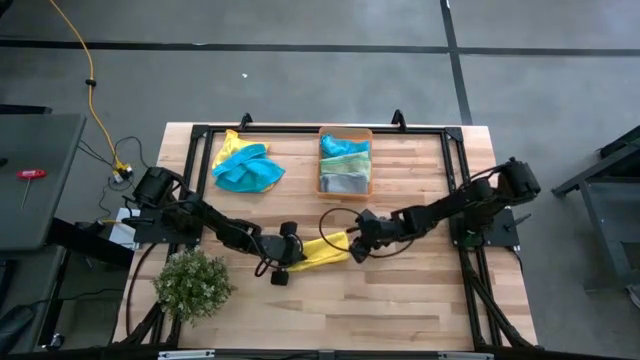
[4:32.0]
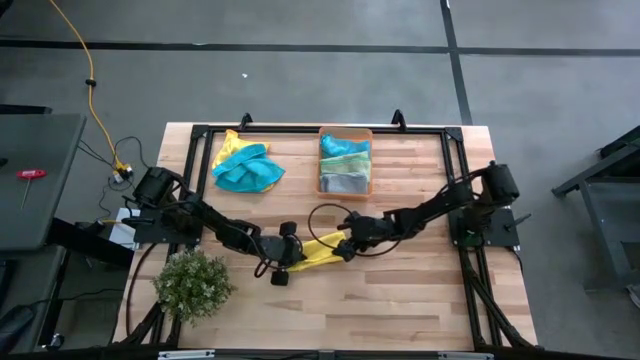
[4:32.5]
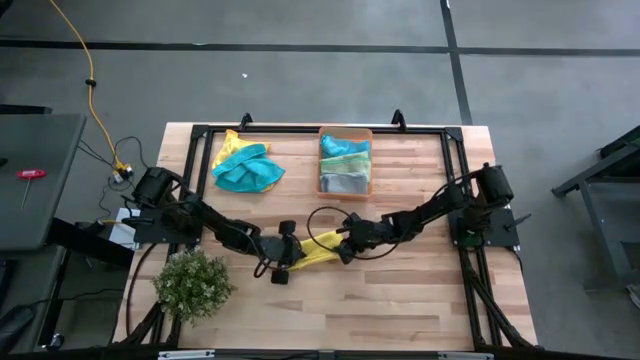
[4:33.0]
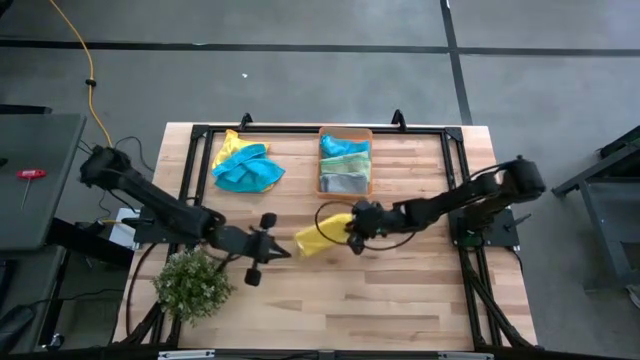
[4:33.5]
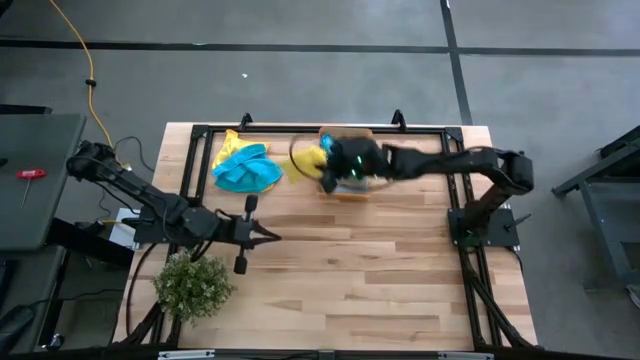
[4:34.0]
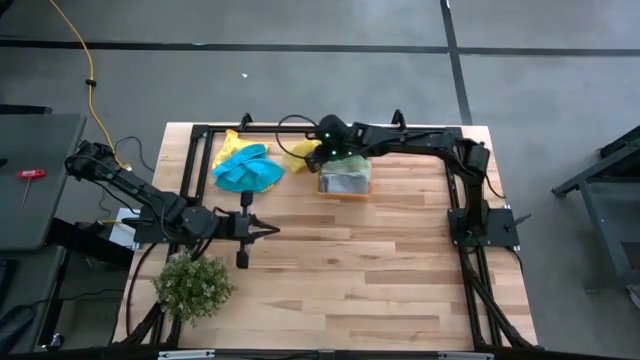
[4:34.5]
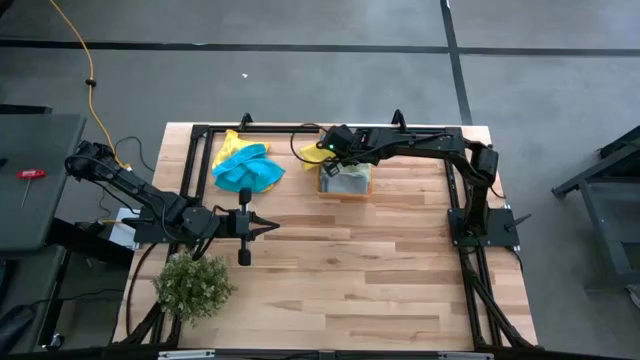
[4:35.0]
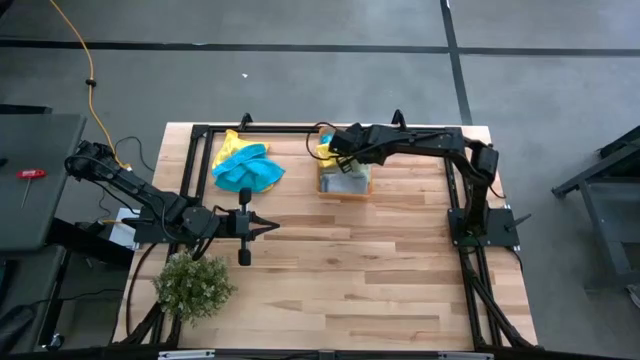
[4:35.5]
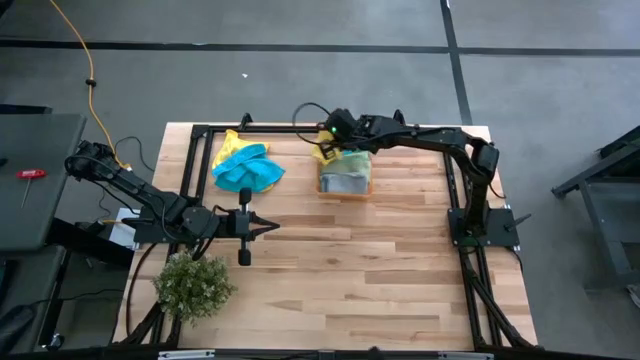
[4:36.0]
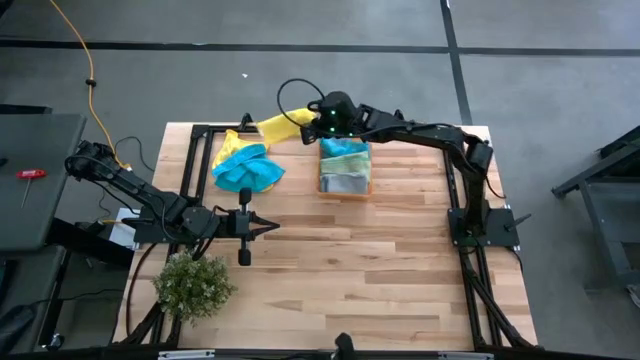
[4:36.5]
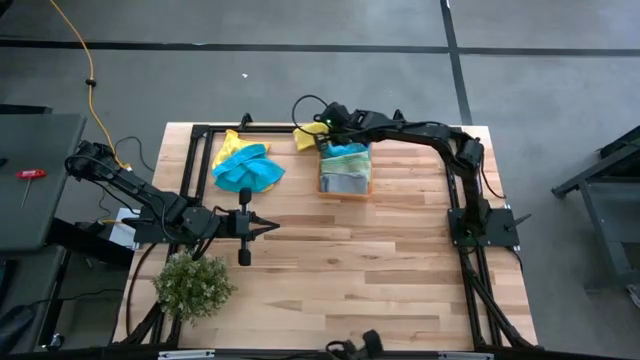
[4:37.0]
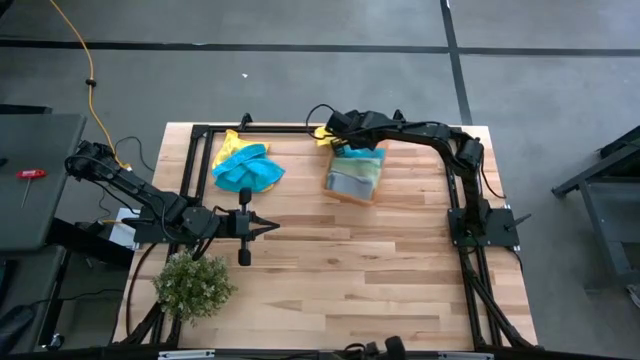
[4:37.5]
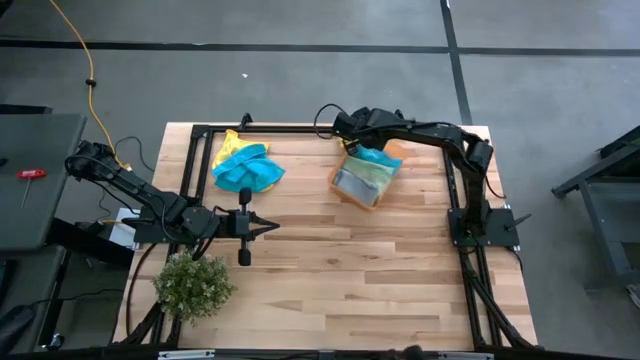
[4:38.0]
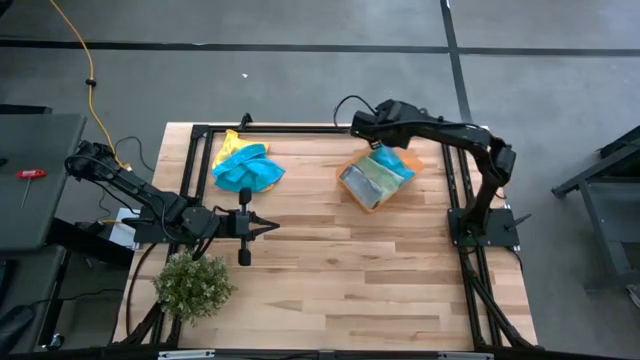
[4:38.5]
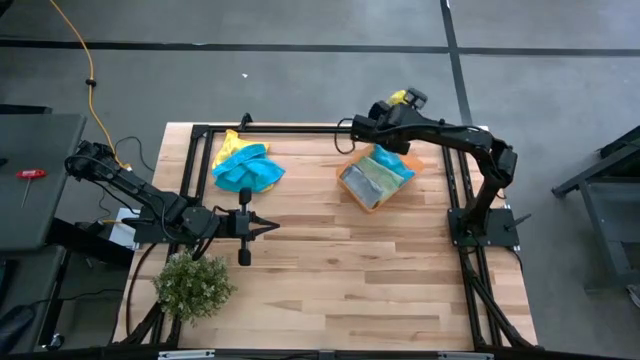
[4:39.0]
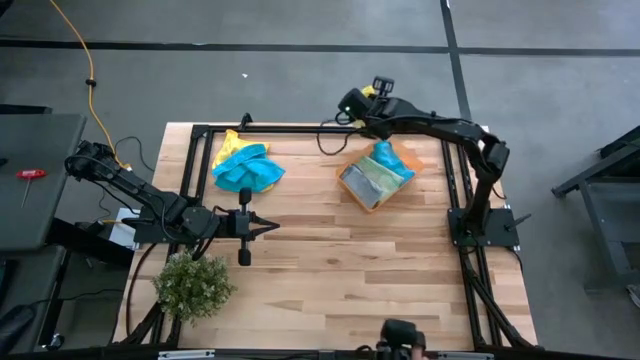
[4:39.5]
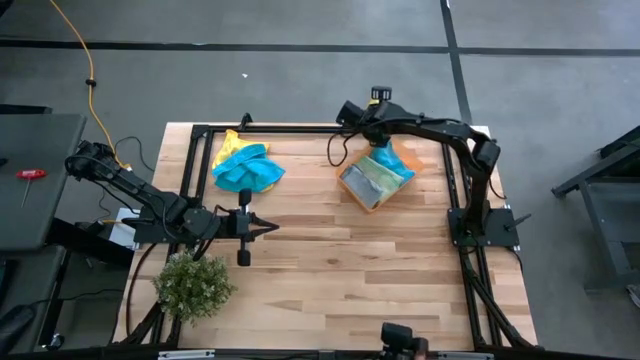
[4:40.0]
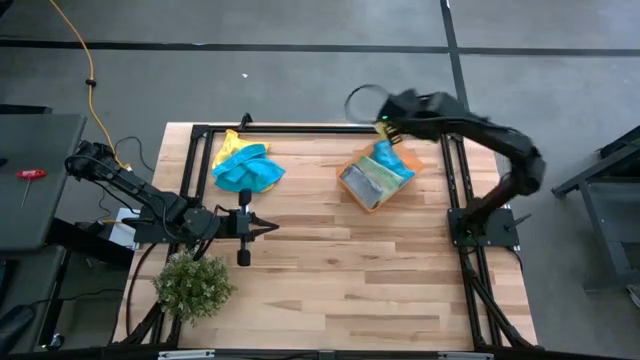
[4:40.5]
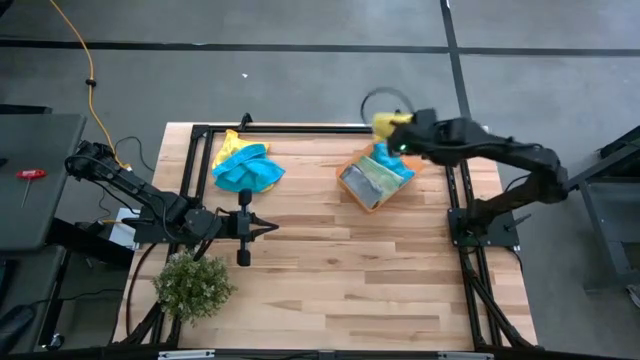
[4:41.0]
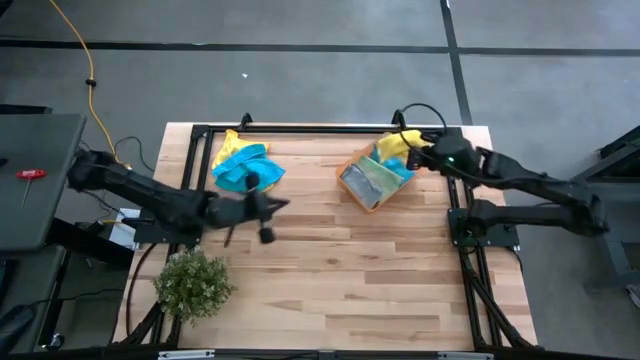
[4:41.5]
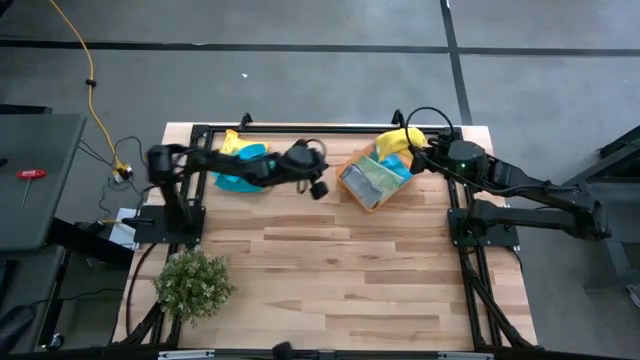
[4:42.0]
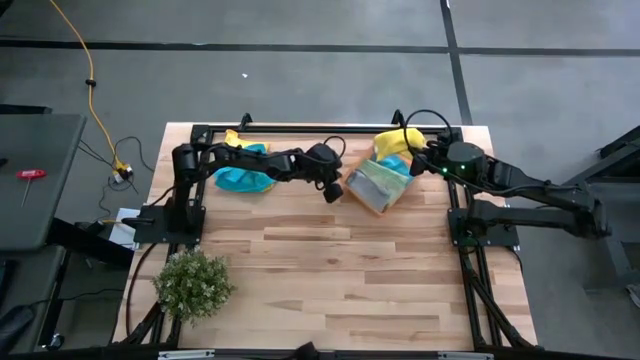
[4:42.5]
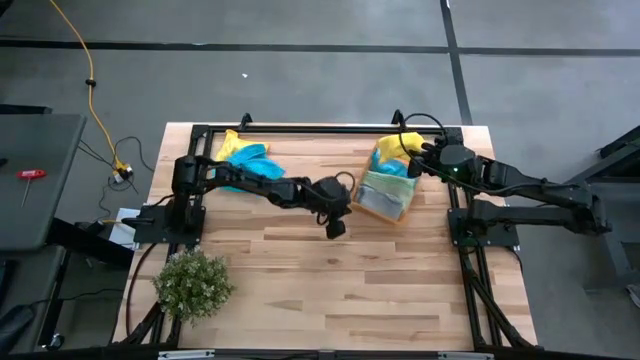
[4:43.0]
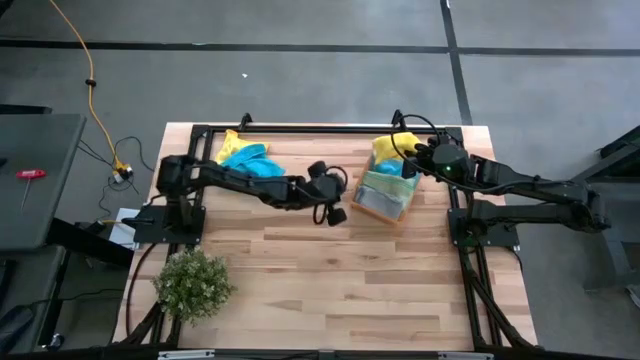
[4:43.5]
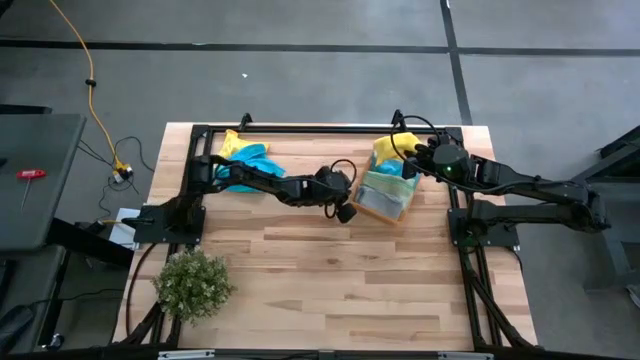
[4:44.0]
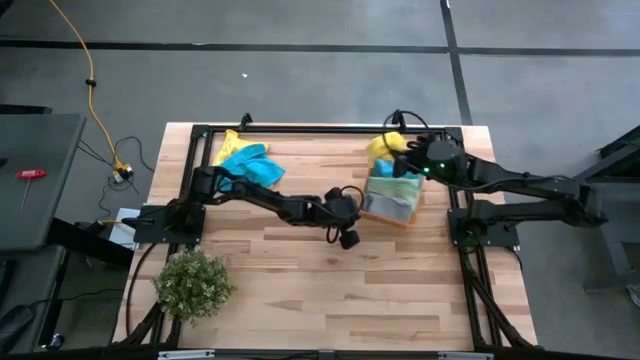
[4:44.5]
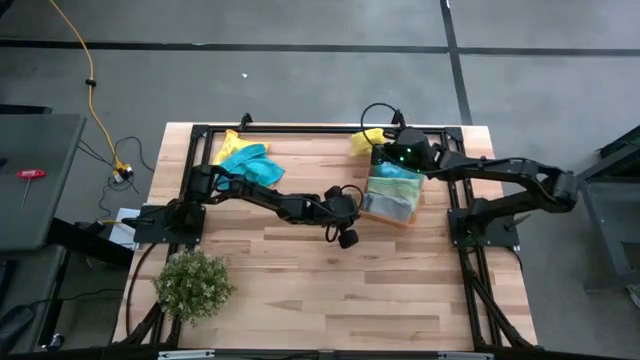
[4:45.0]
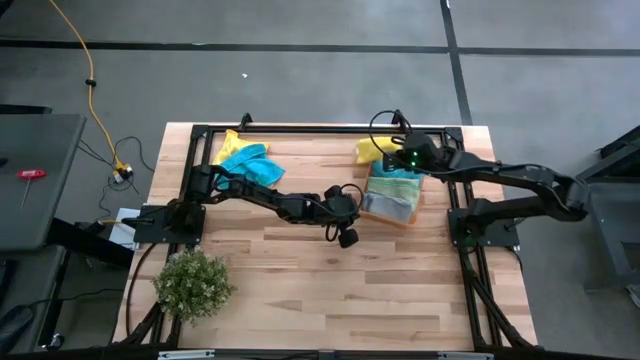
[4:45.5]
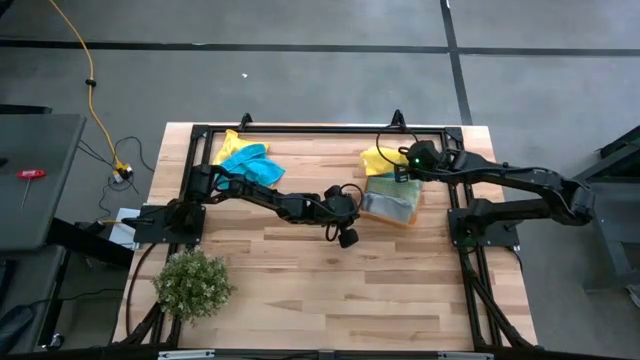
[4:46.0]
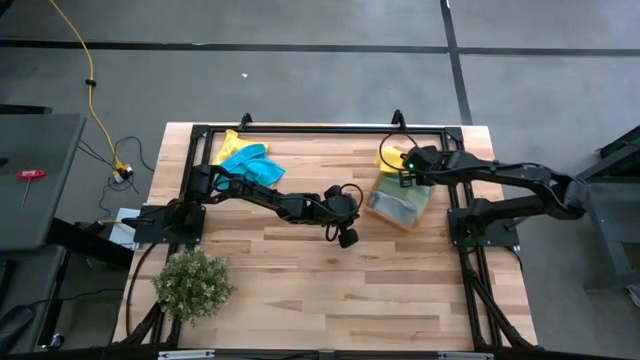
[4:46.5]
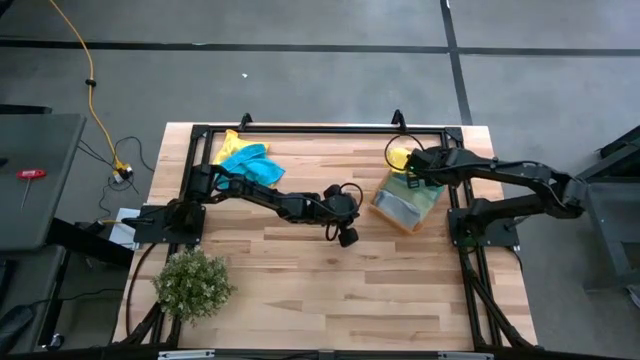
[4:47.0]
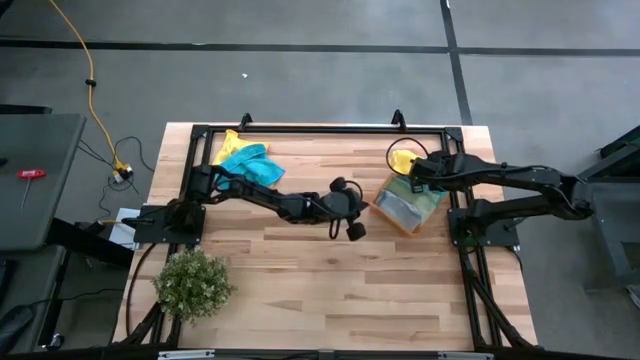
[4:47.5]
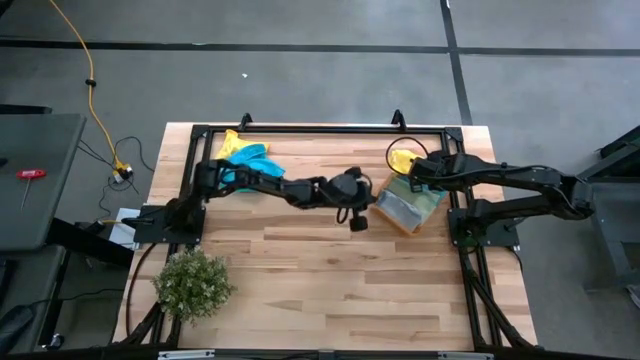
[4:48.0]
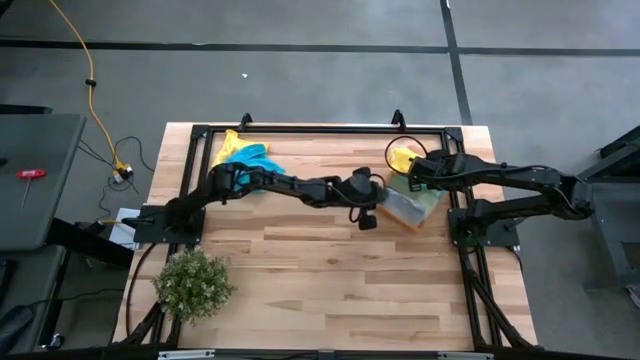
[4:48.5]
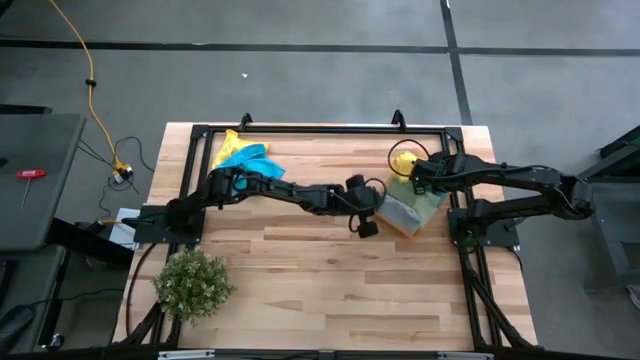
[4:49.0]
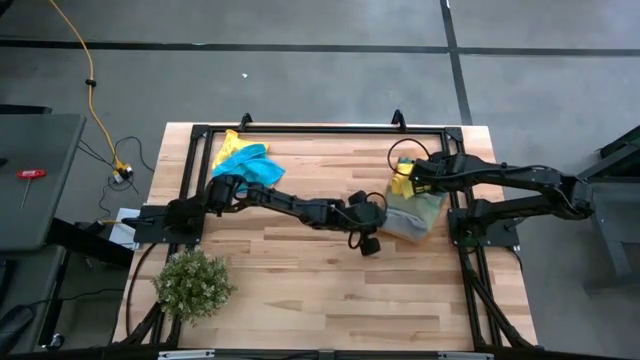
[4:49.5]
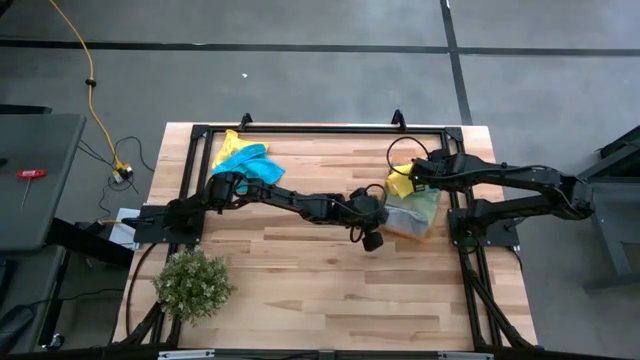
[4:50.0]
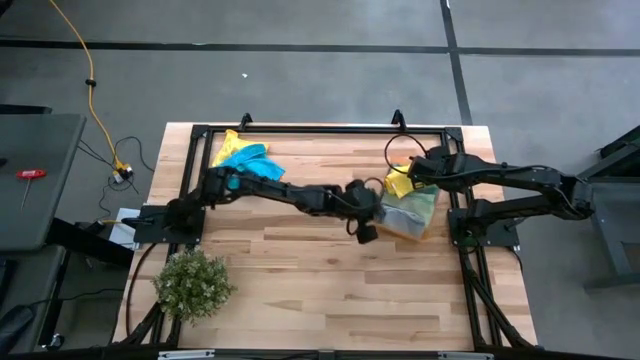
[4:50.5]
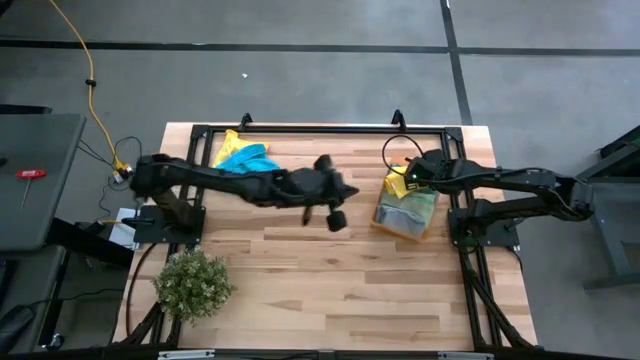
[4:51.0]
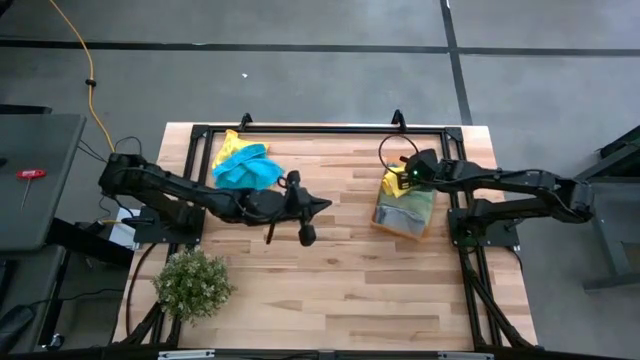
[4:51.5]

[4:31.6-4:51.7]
Task: Fold microfiber towels
Put the right folded yellow microfiber cloth into the orange bin
